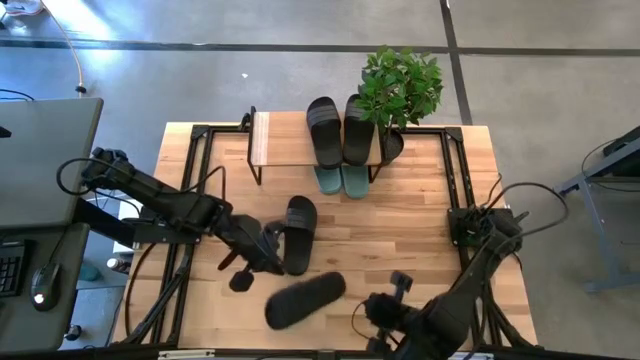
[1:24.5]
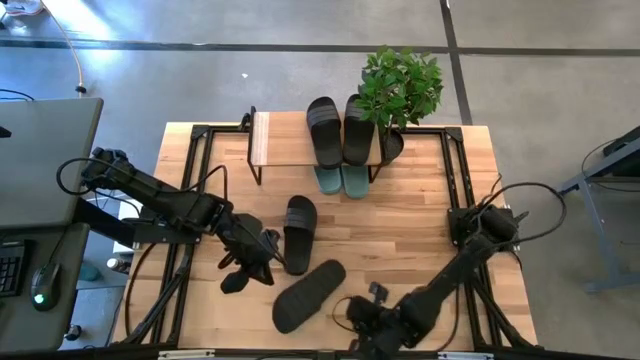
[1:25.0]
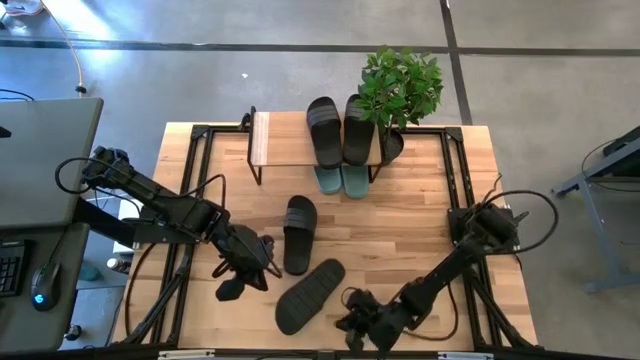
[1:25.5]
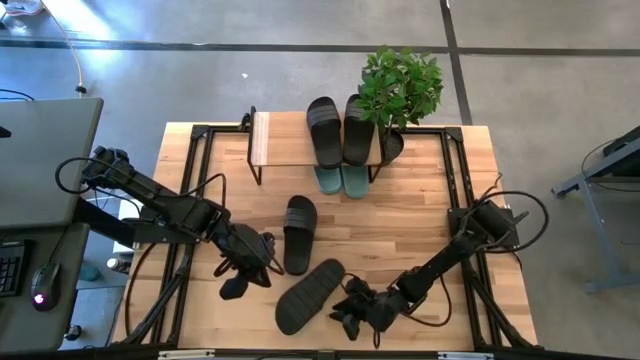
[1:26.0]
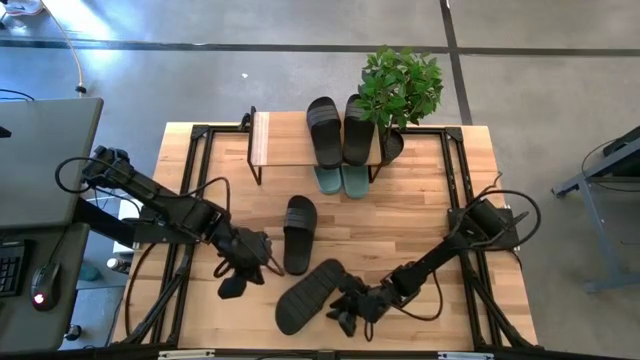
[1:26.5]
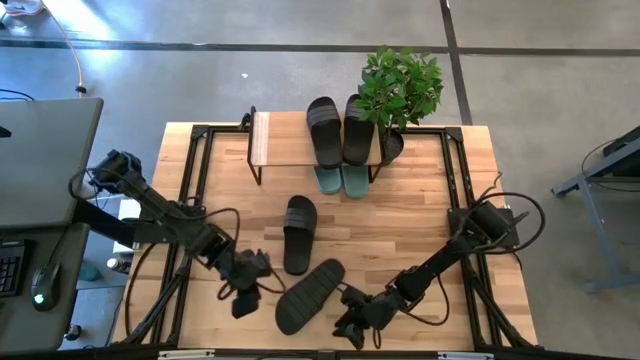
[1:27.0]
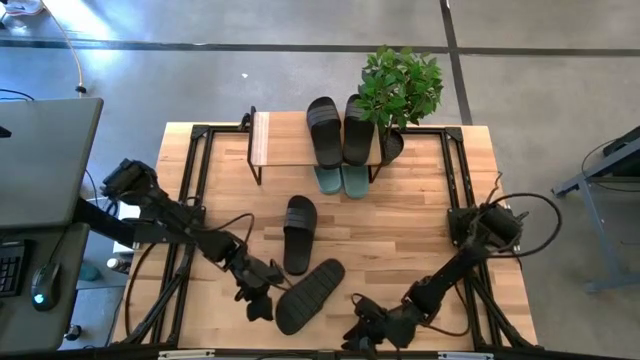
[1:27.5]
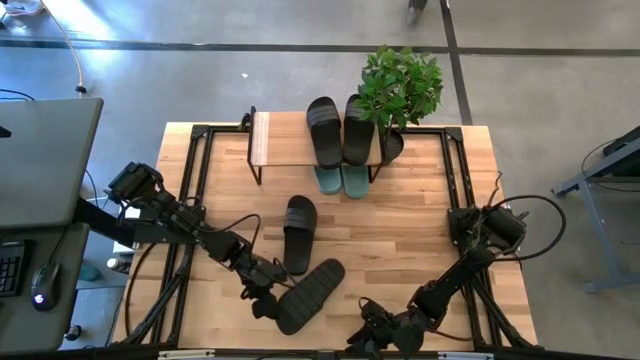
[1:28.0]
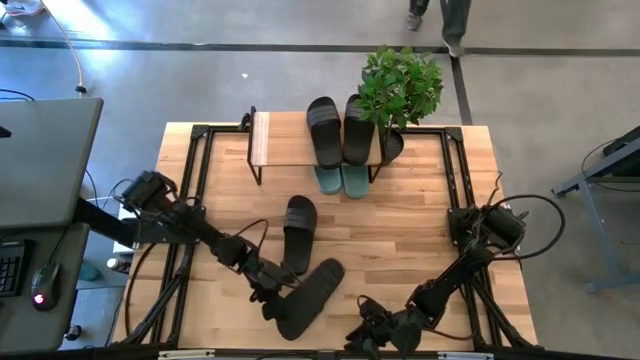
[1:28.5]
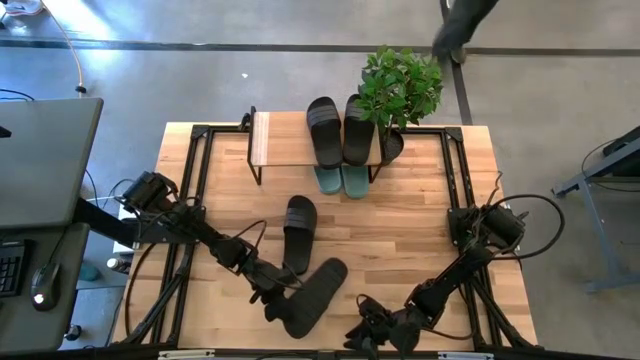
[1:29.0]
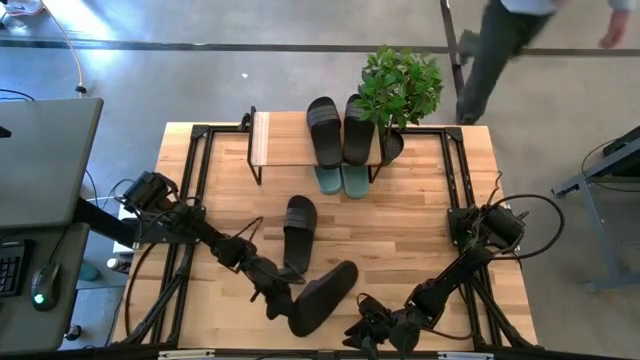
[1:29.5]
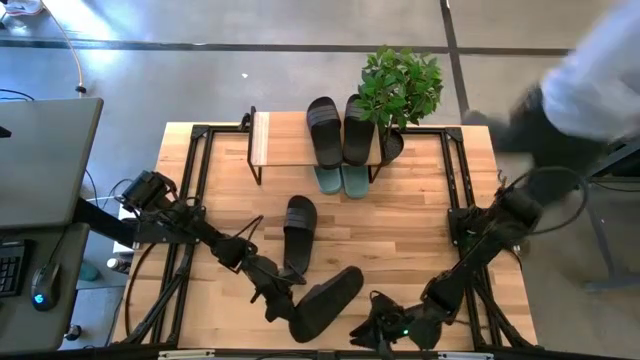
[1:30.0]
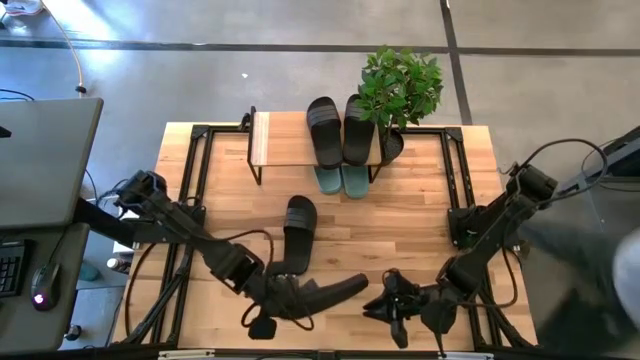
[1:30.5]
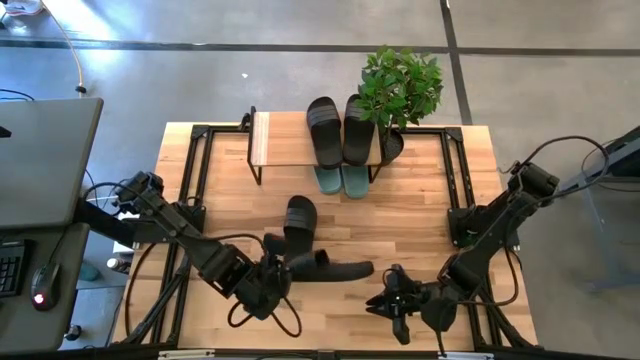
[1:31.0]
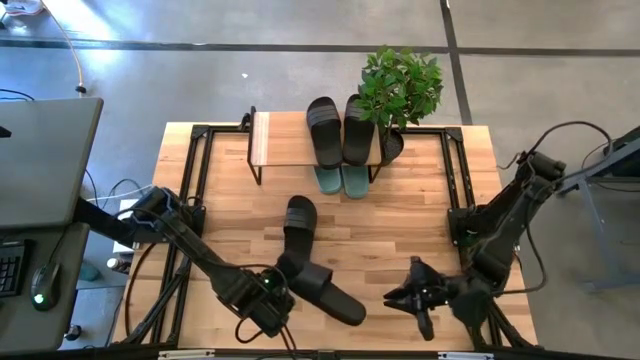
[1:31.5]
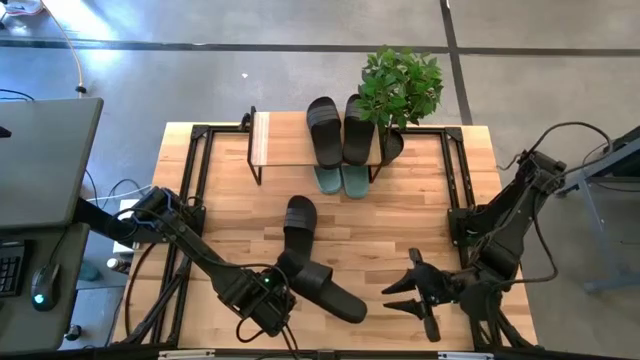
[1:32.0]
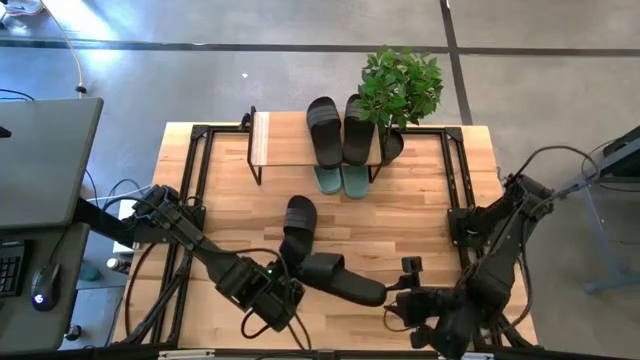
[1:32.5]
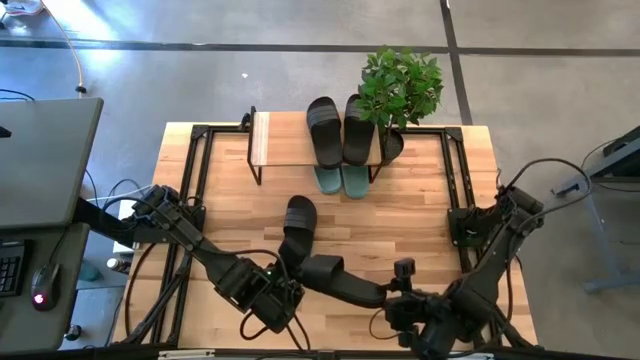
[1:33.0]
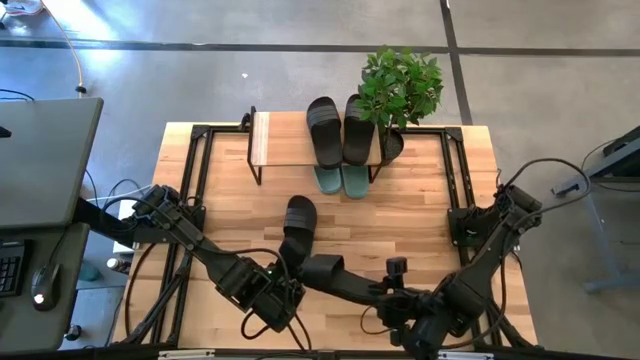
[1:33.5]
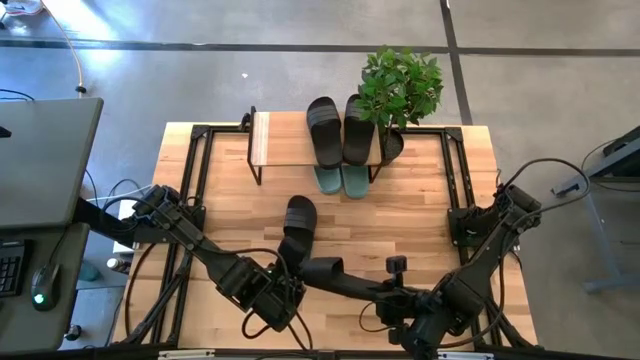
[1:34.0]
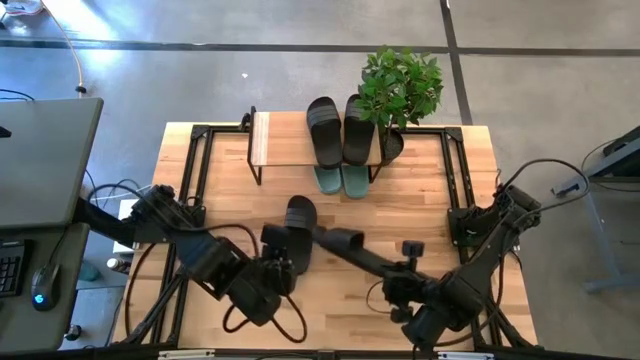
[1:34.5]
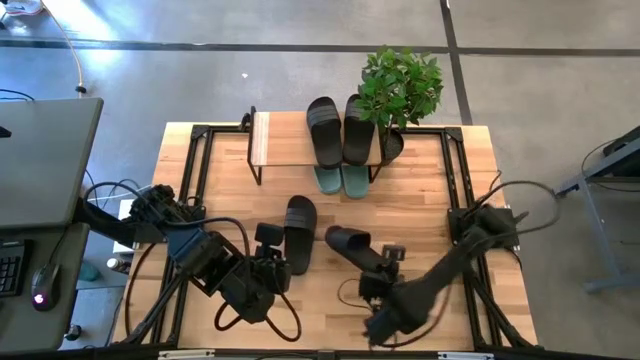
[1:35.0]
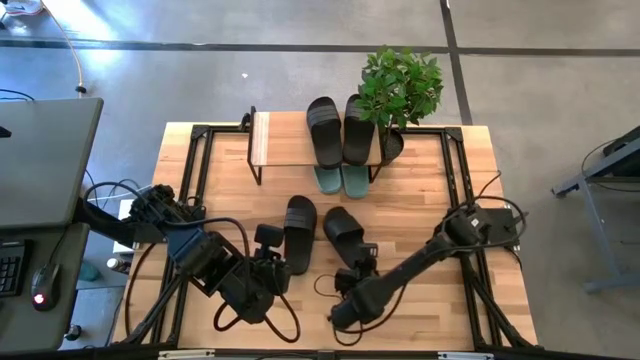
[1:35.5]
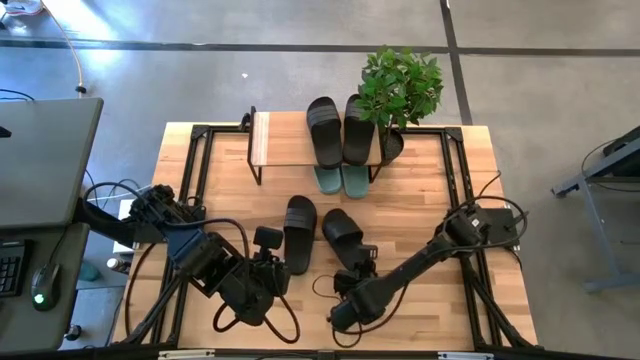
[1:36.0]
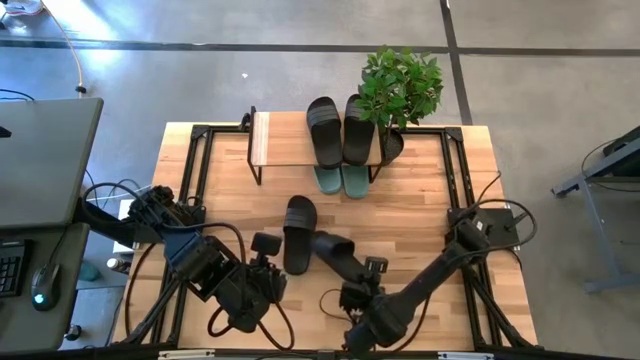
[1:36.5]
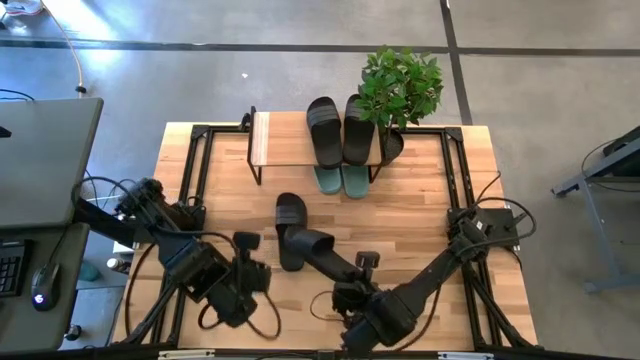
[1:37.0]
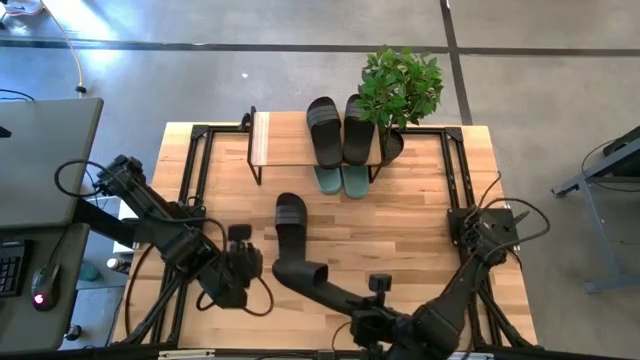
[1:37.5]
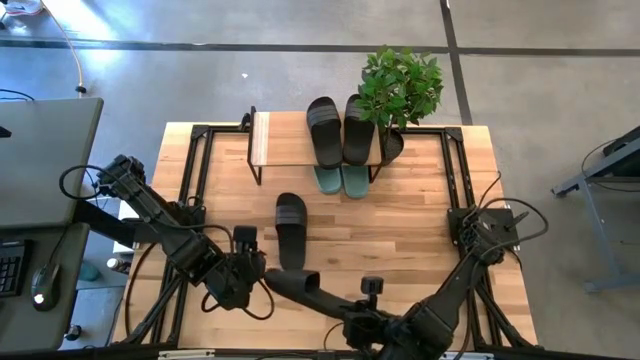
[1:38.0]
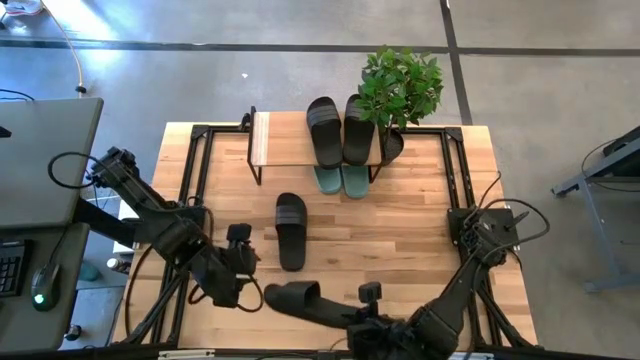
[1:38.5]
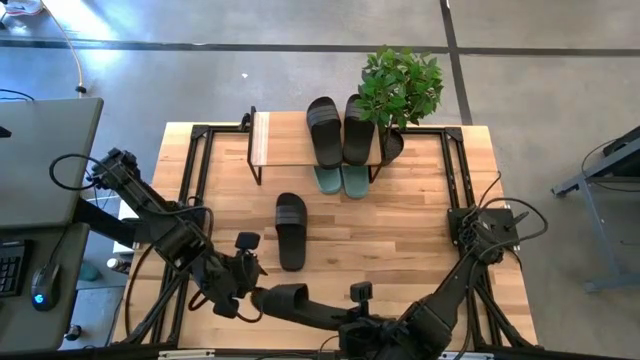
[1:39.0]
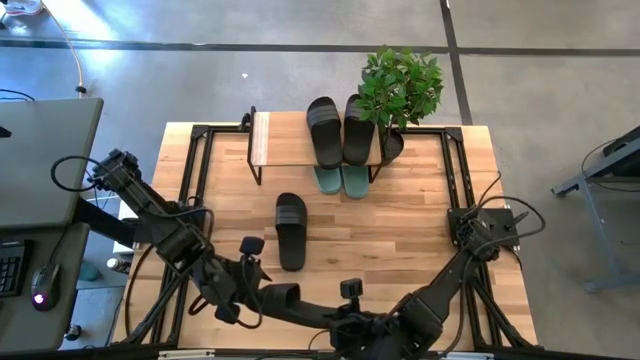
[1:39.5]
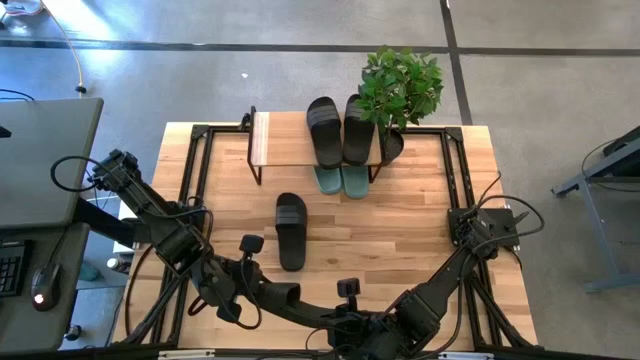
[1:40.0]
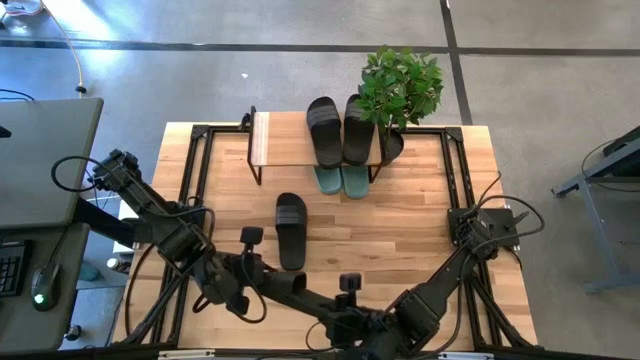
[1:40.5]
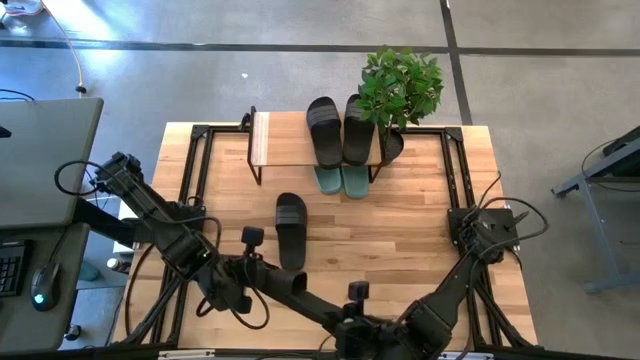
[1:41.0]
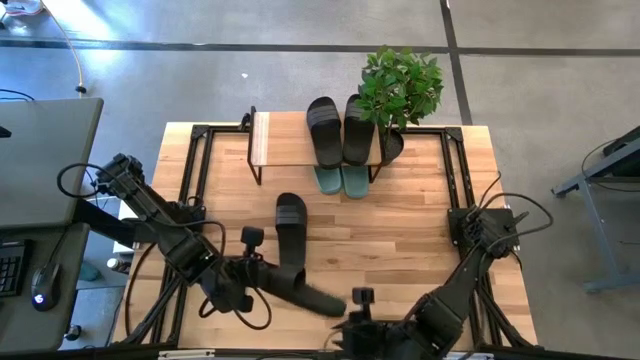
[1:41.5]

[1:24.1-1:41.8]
Task: Pick and place slides into the shelf
Put the black slipper under the shelf

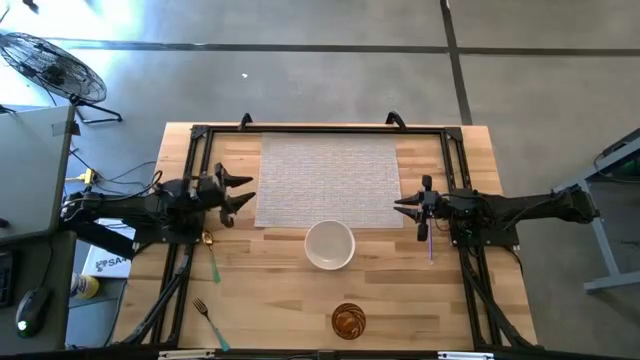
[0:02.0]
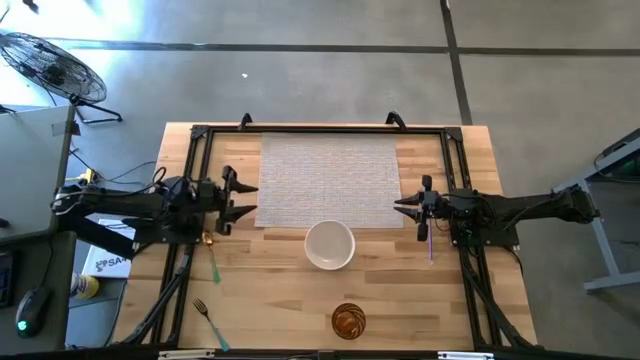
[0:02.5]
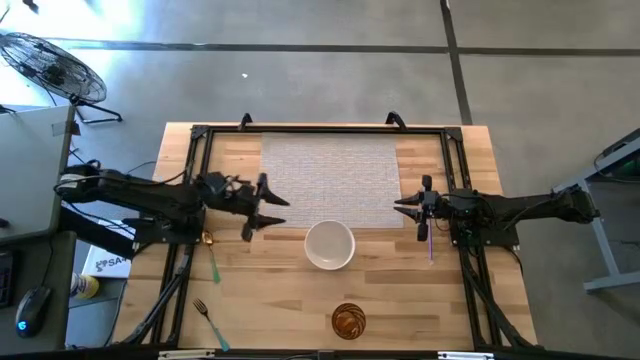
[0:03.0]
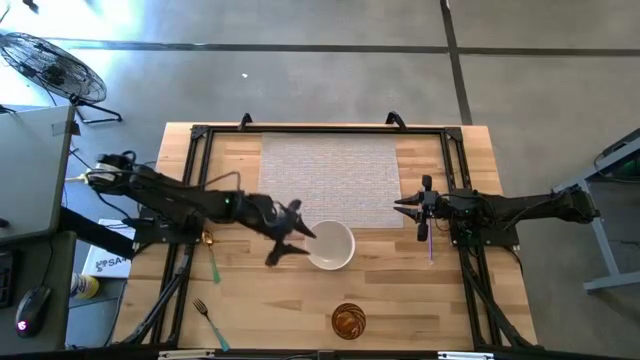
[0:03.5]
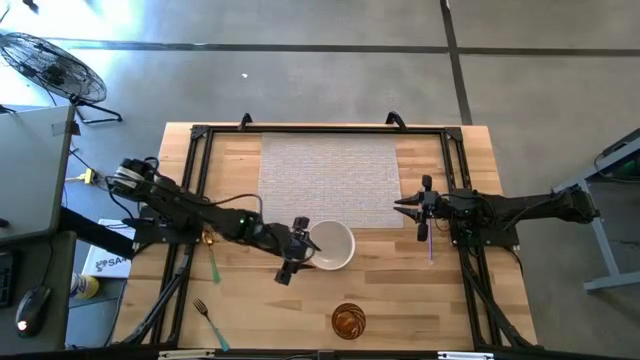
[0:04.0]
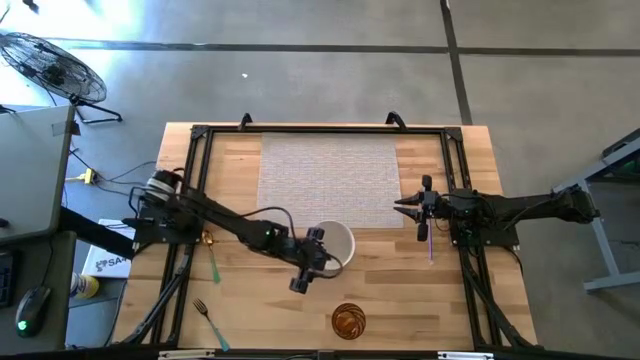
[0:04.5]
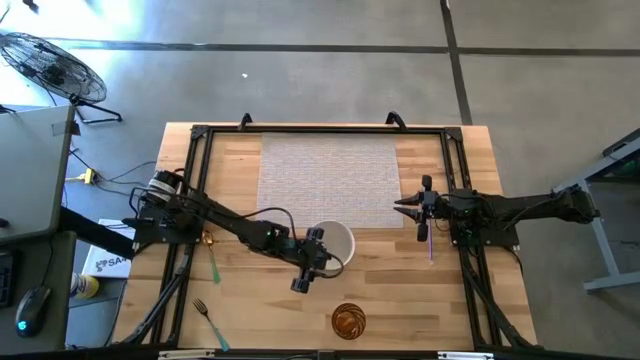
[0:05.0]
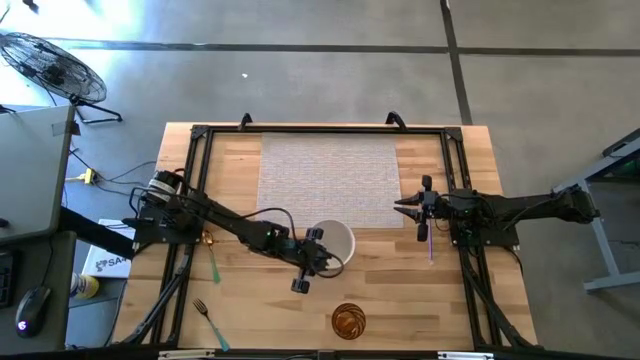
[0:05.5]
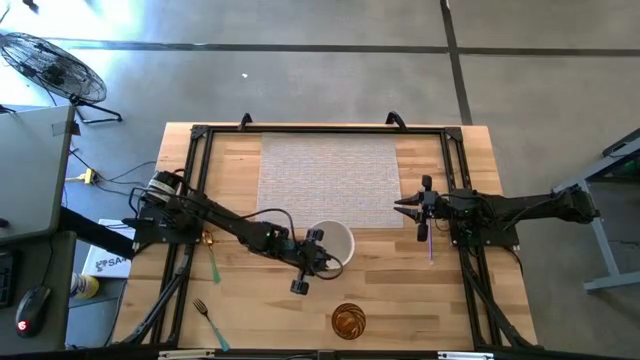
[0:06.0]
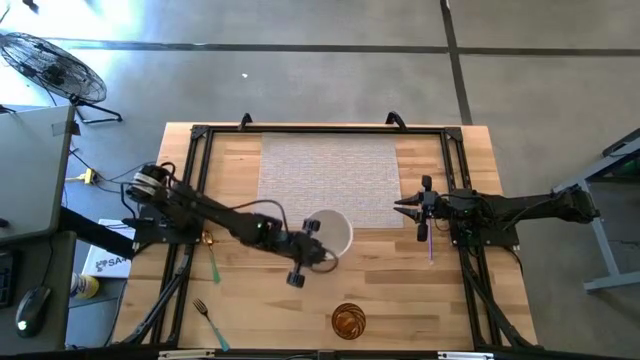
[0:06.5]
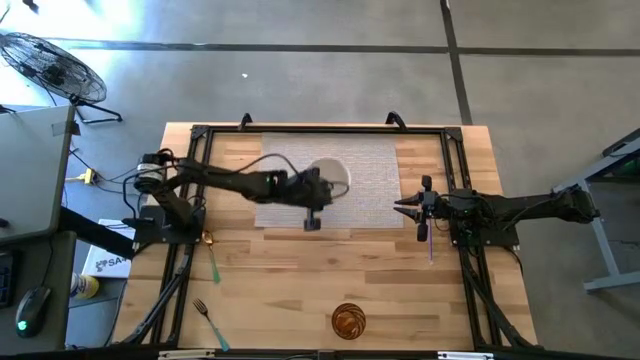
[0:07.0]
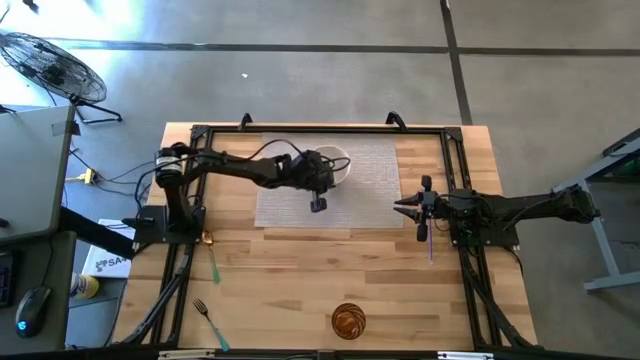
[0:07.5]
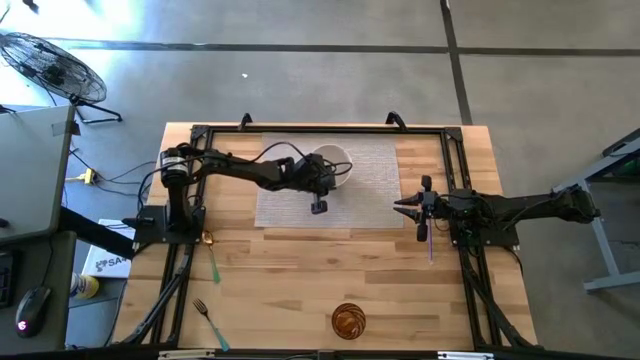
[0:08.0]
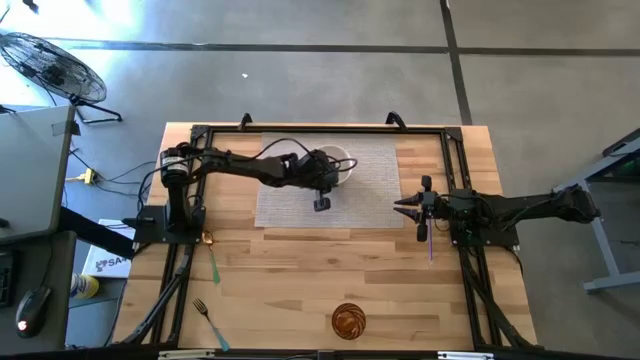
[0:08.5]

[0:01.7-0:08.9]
Task: Pick & Place Utensil
Put the white bowl on the center of the gray mat
